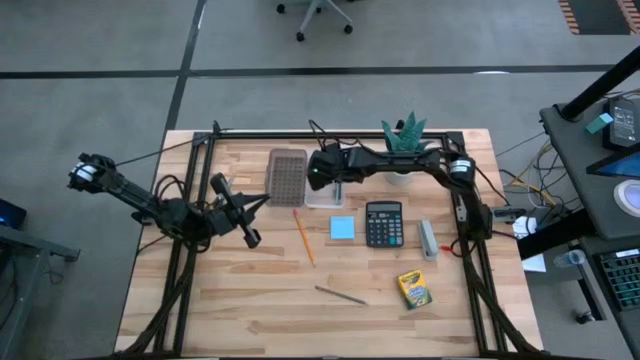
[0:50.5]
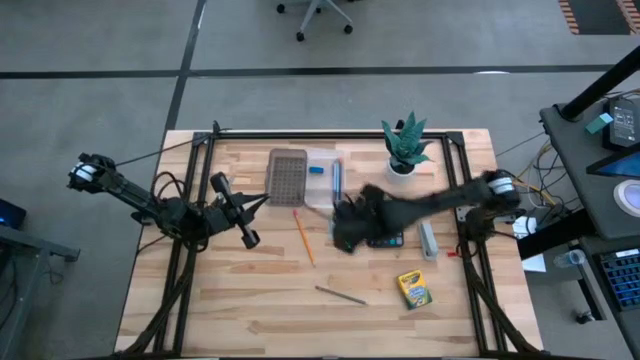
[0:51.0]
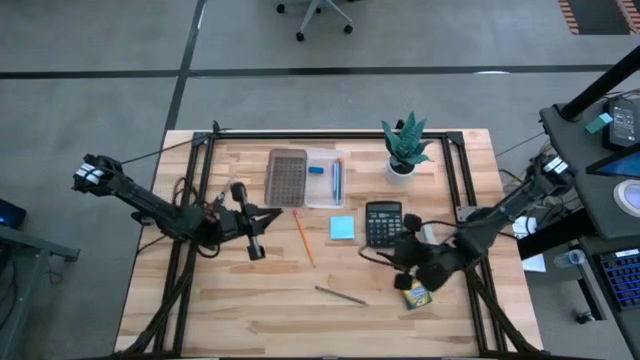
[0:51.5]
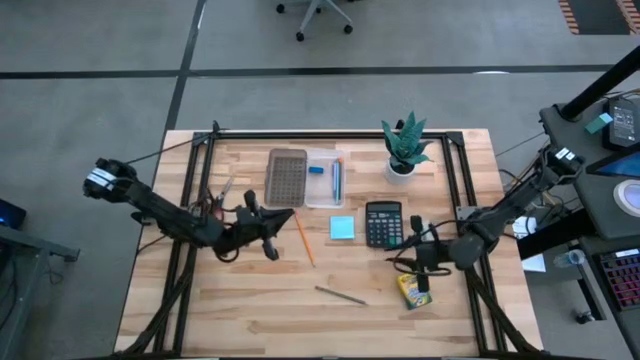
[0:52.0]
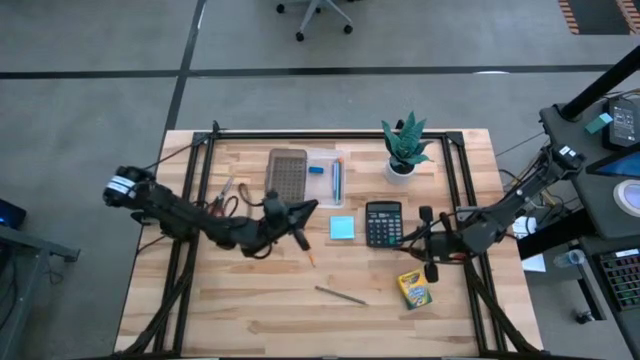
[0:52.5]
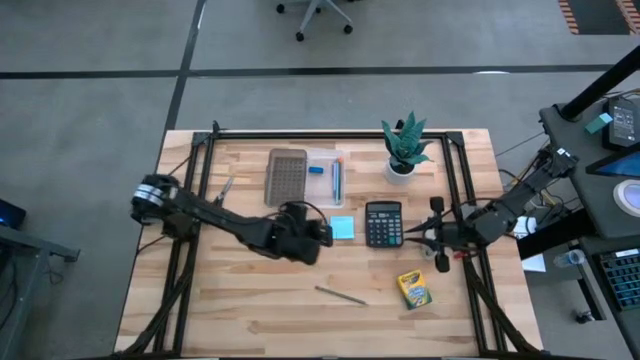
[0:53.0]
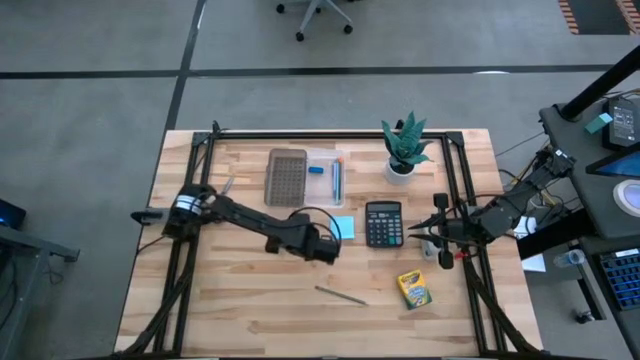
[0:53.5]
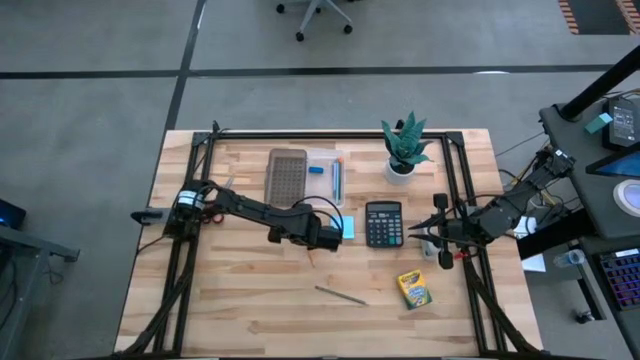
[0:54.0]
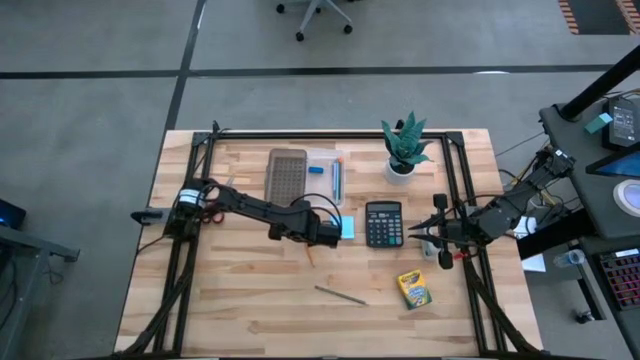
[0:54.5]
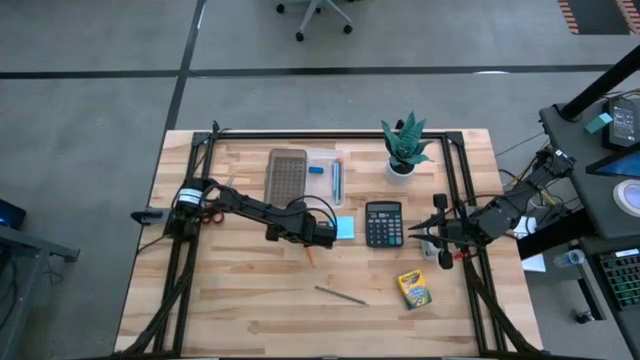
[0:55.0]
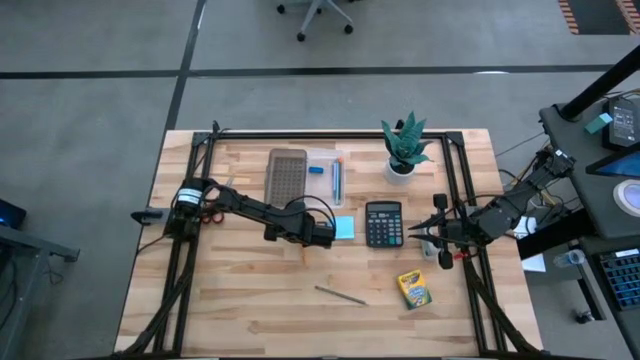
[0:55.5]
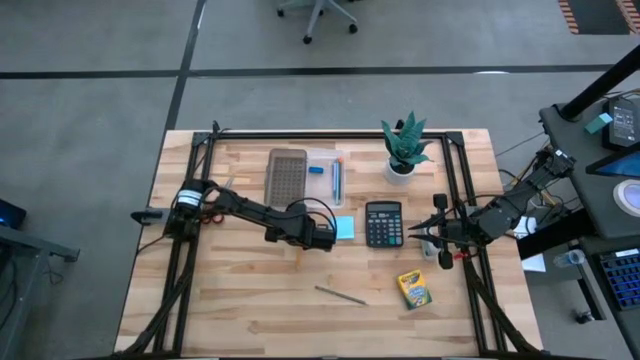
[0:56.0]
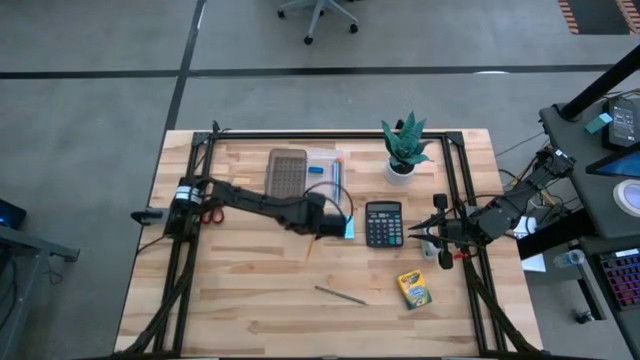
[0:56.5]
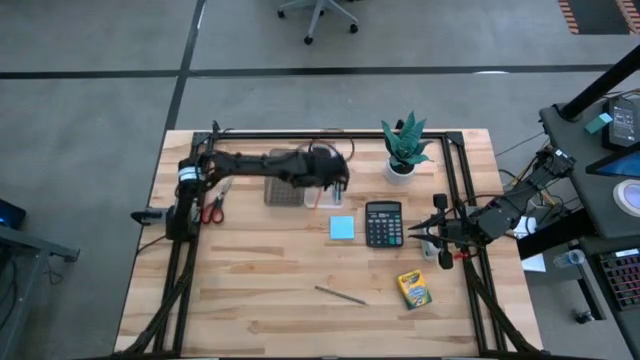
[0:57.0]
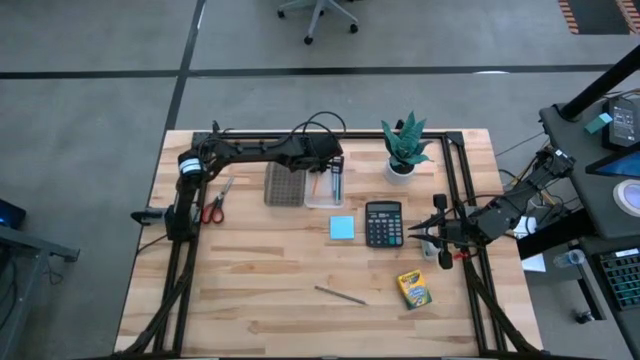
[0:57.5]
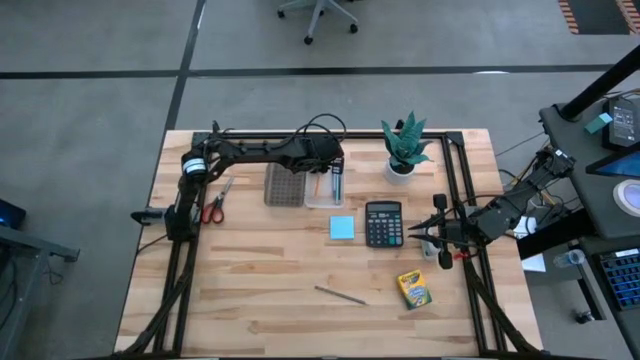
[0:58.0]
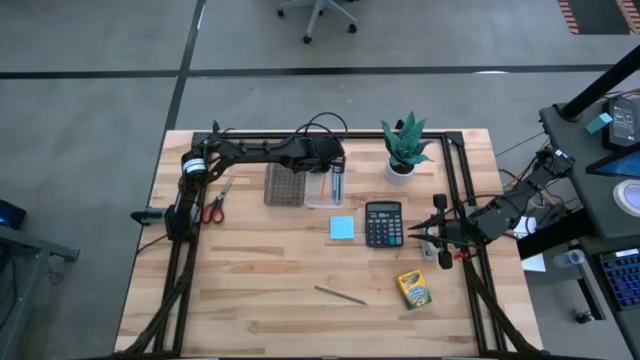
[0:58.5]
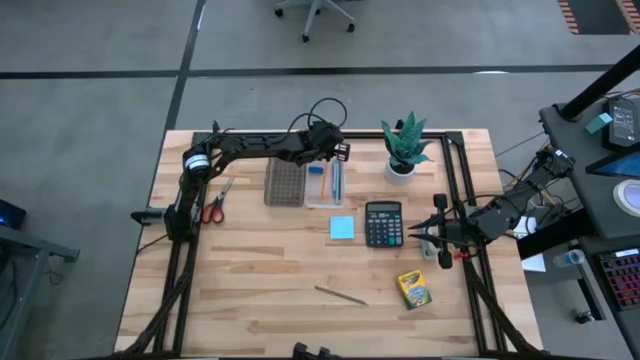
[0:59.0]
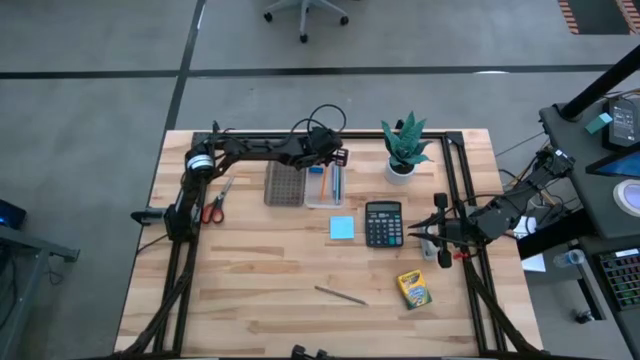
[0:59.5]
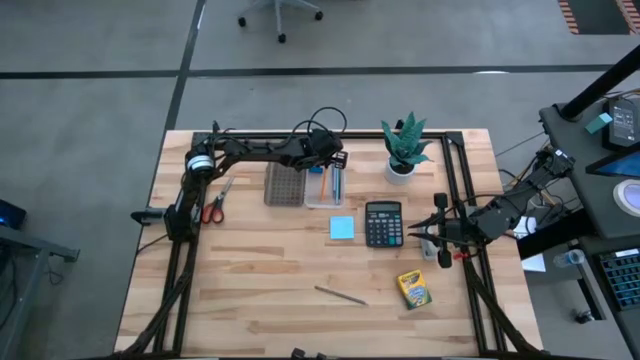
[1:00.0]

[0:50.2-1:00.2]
Task: Pack school essentials
Put the orange pencil into the transparent supply box

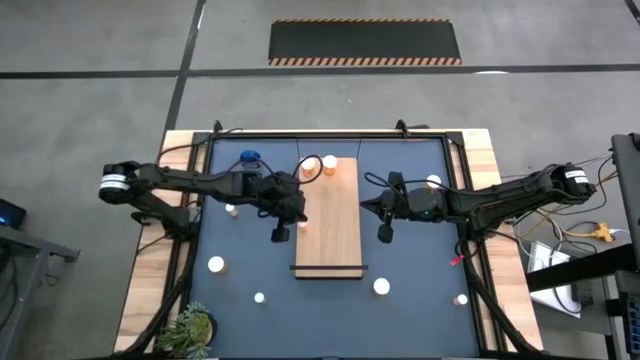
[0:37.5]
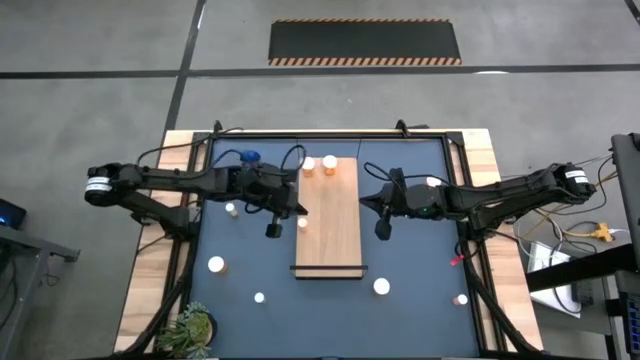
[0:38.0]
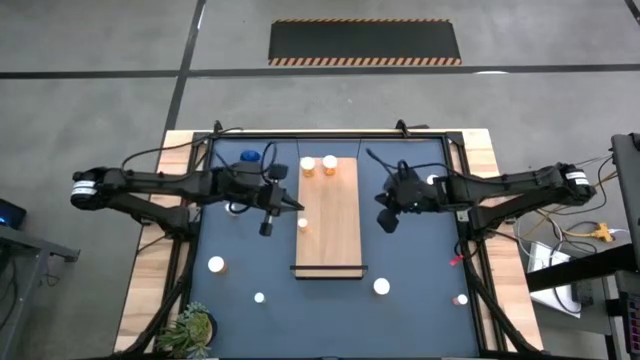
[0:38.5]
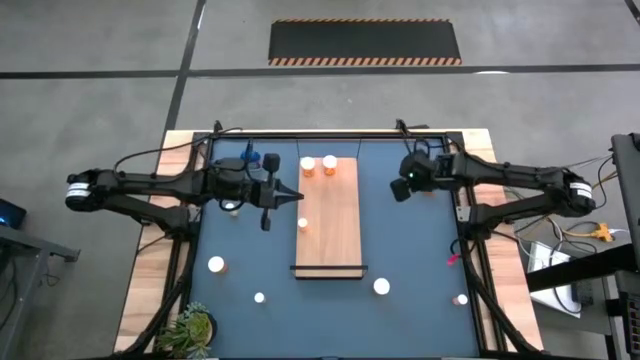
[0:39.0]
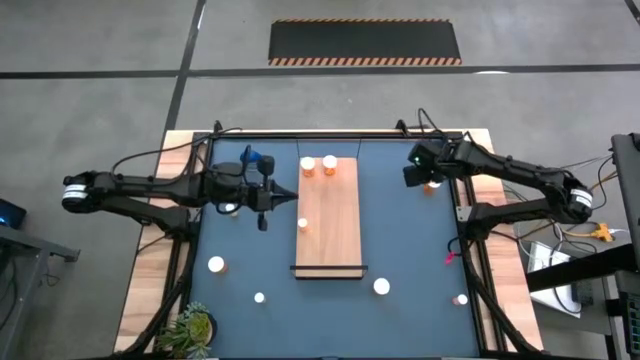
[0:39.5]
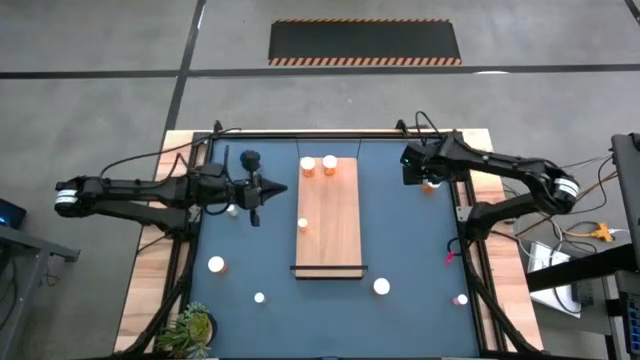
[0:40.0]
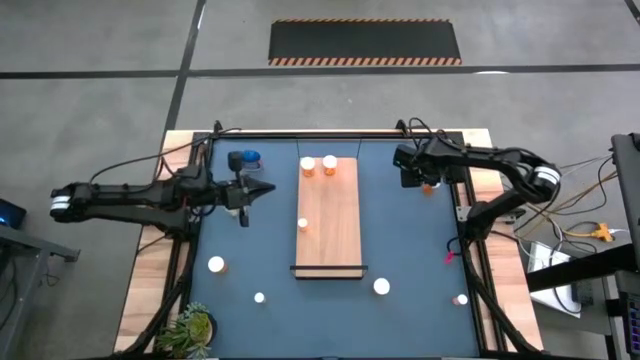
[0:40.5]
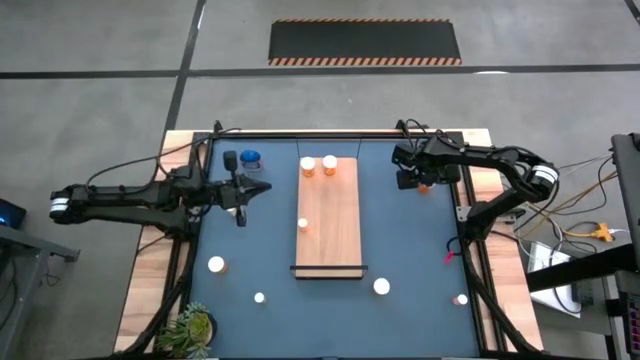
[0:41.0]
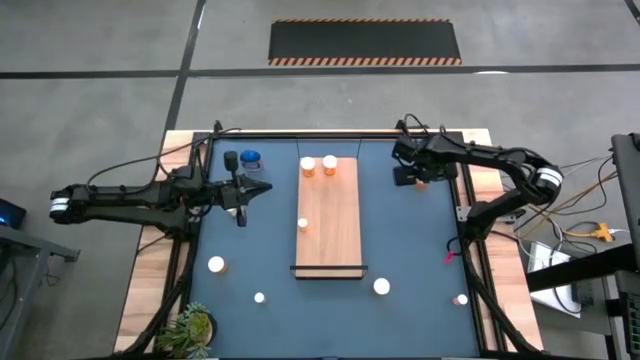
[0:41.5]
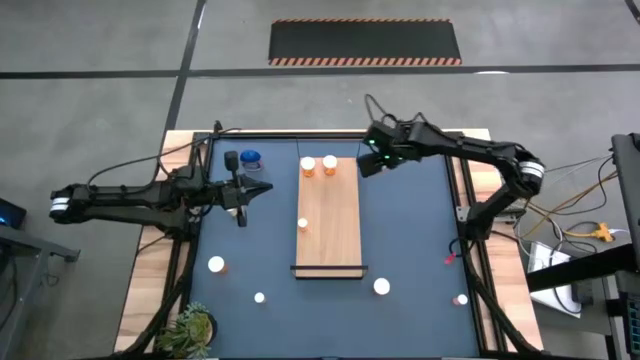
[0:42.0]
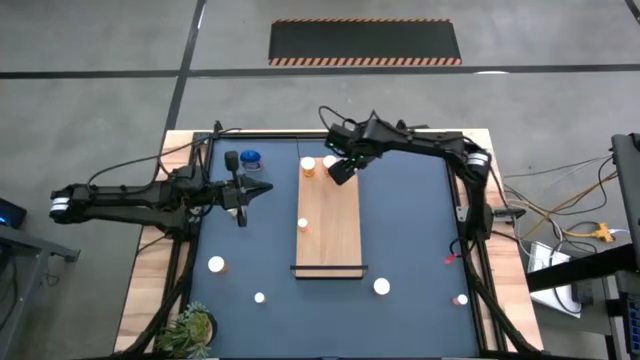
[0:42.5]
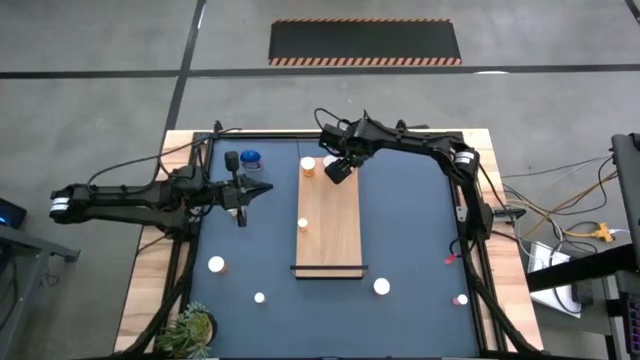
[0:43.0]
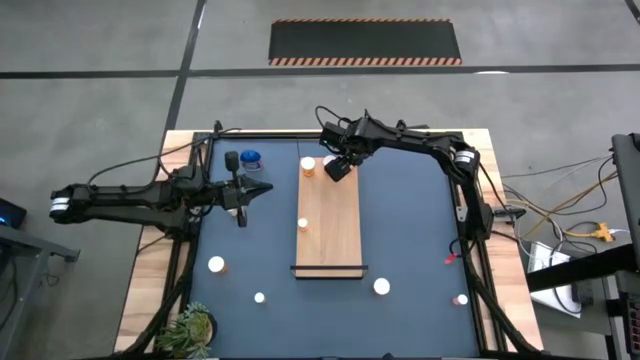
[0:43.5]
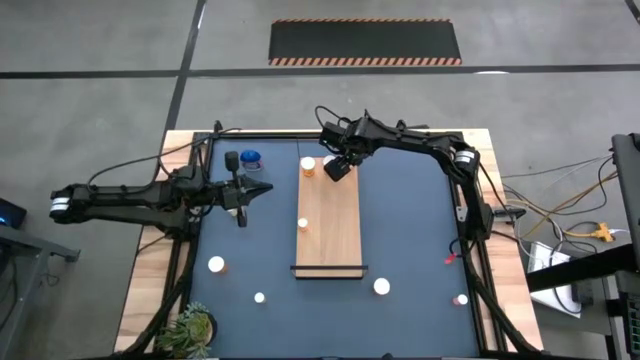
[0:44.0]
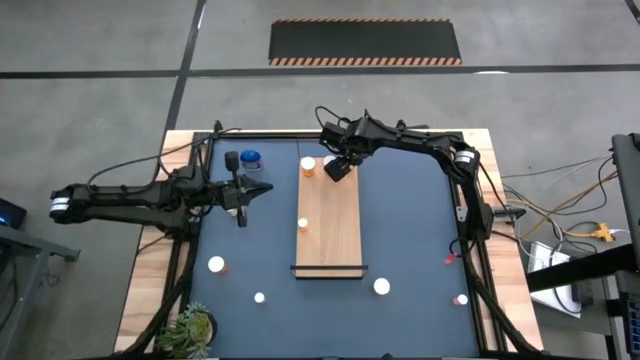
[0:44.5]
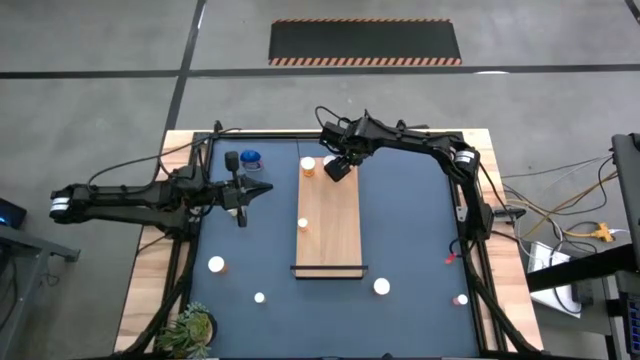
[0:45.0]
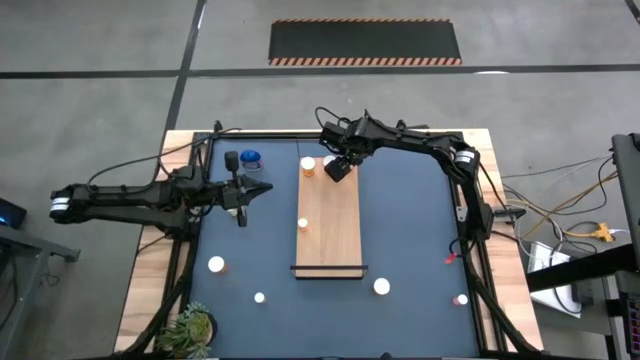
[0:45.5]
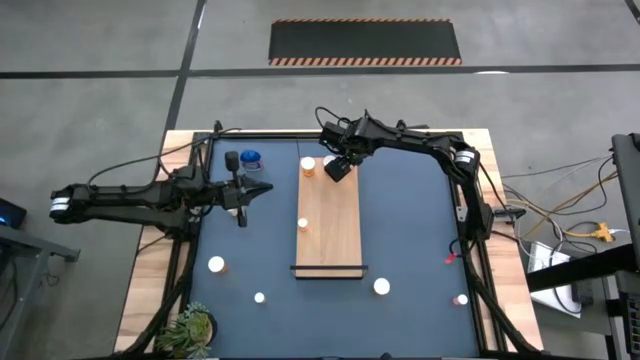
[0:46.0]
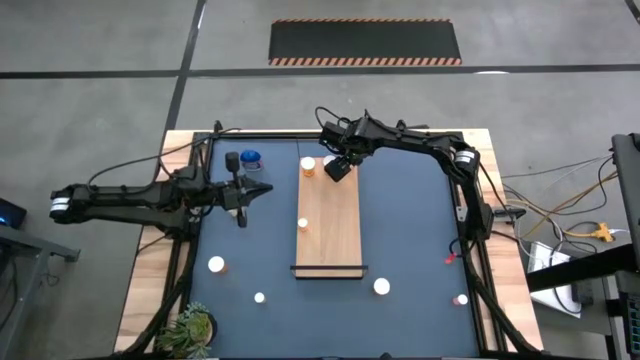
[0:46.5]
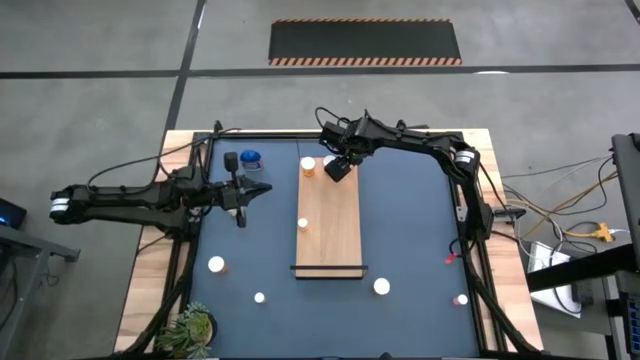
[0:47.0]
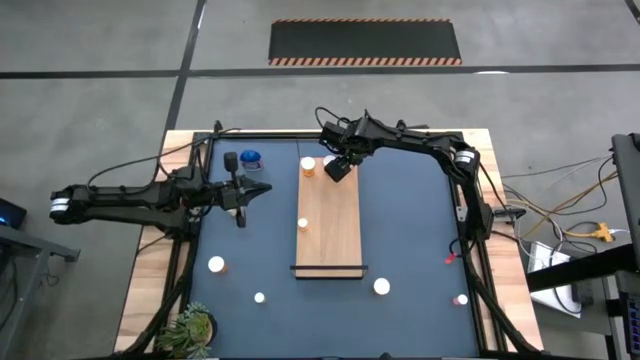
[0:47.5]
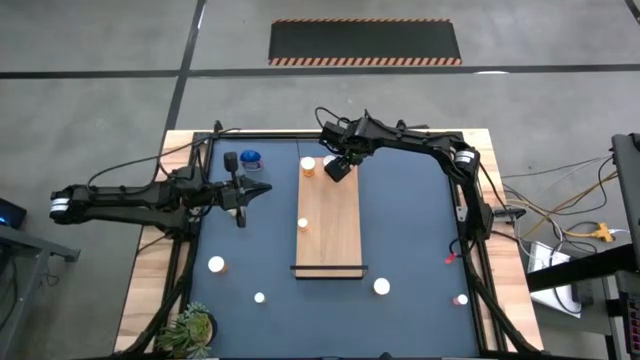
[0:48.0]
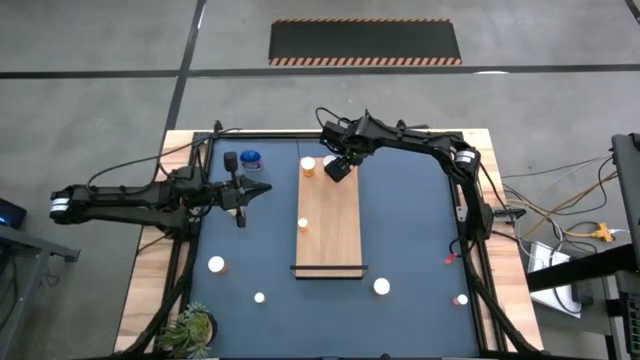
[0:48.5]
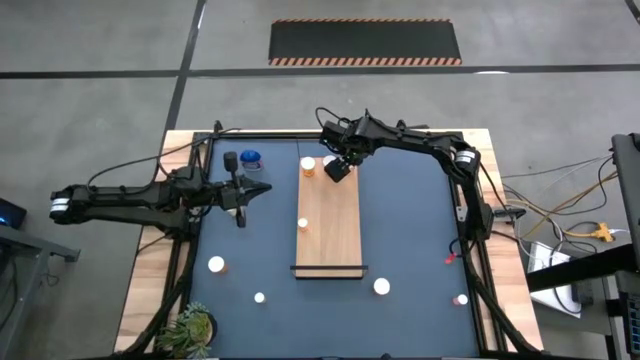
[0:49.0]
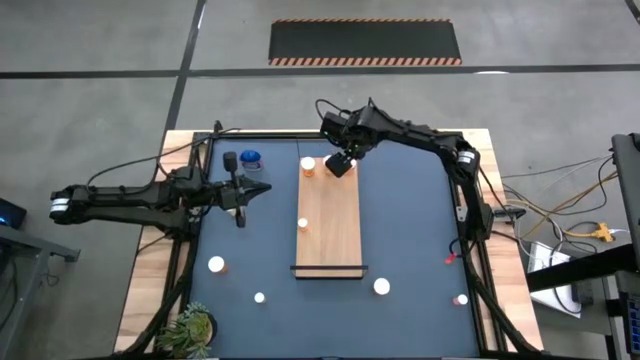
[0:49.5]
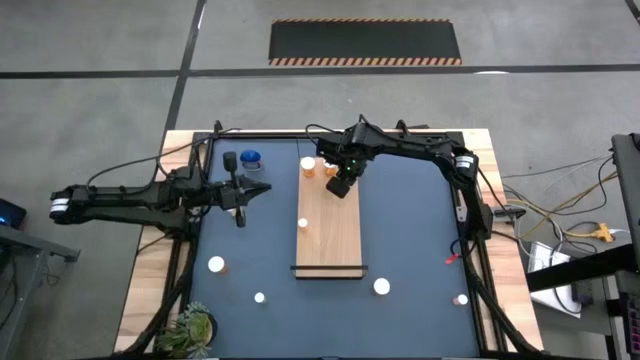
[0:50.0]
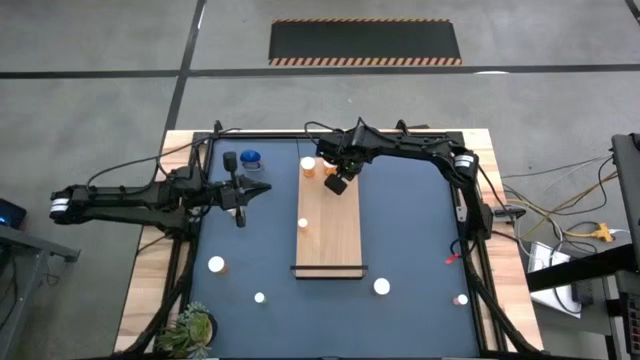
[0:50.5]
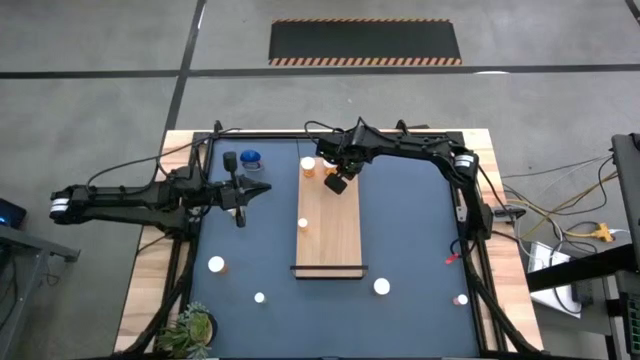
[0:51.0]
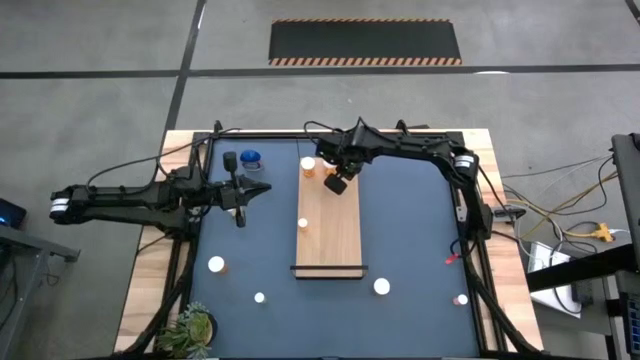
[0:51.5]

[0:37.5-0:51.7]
Task: Pick and place medicine bottles onto shelf by color
Put the big orange pill bottle on the shelf aligned with the big orange pill bottles
